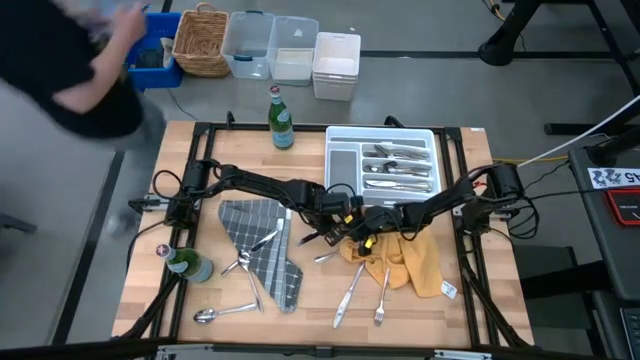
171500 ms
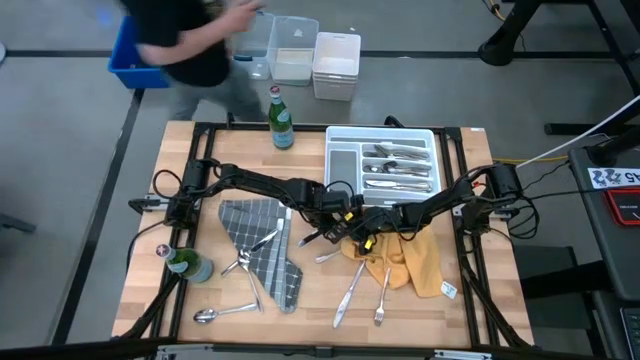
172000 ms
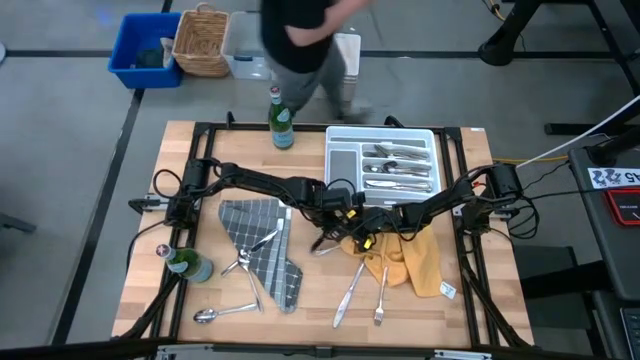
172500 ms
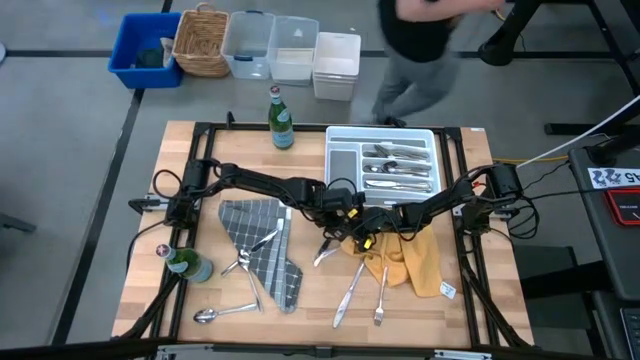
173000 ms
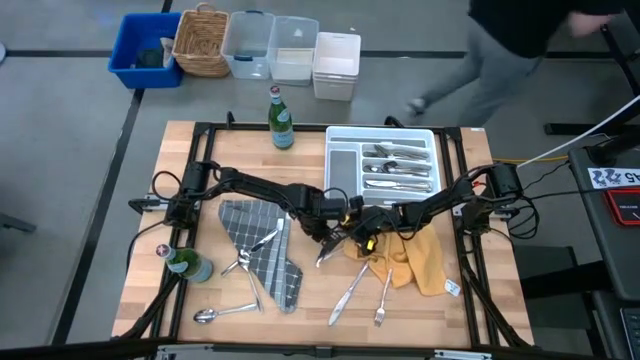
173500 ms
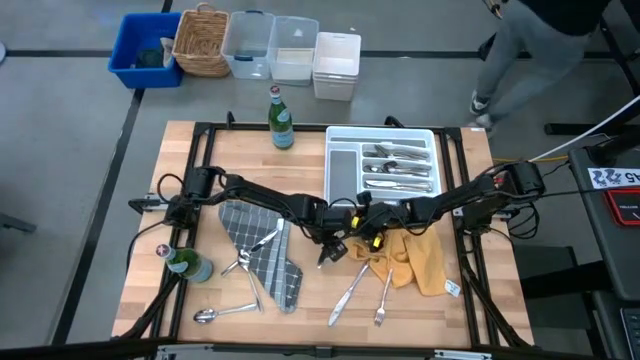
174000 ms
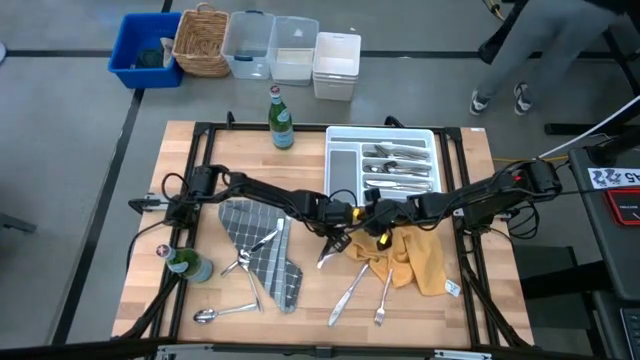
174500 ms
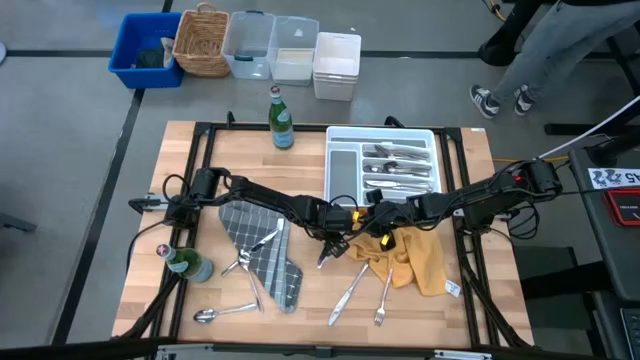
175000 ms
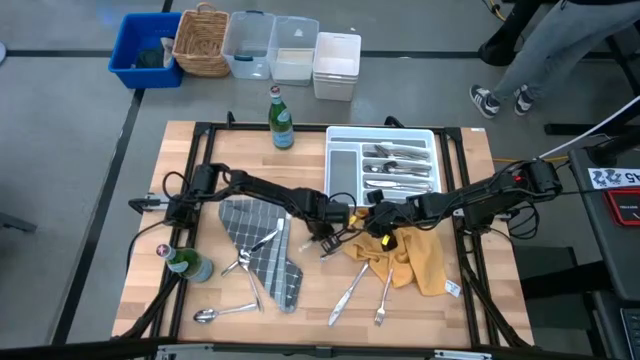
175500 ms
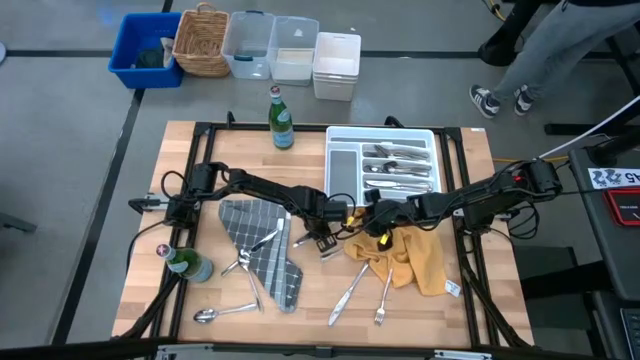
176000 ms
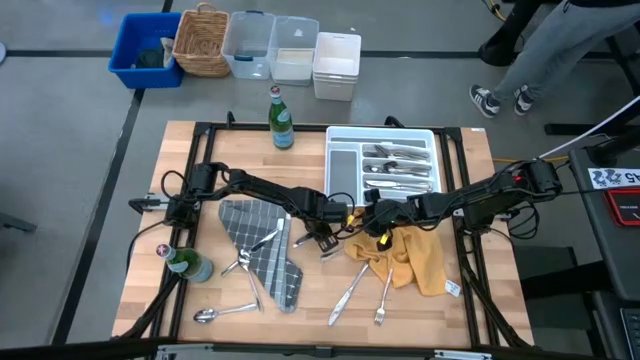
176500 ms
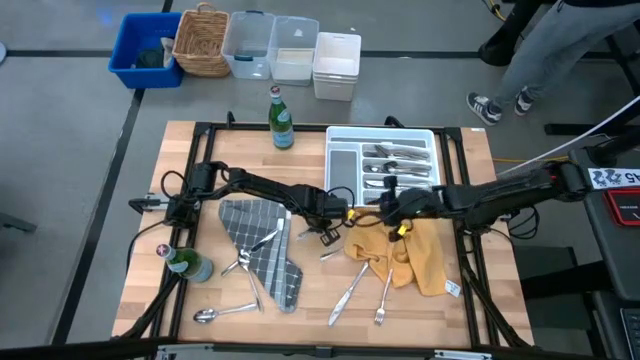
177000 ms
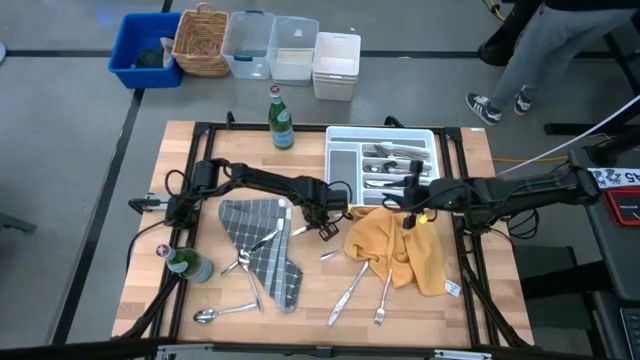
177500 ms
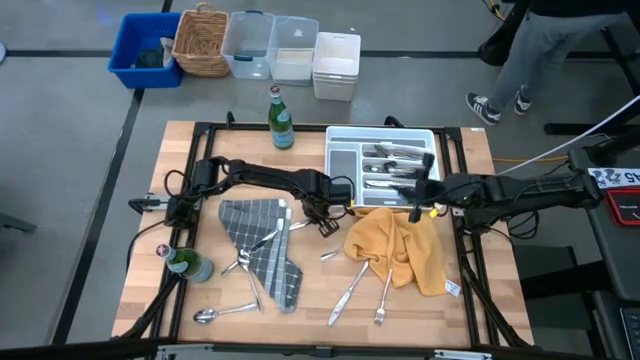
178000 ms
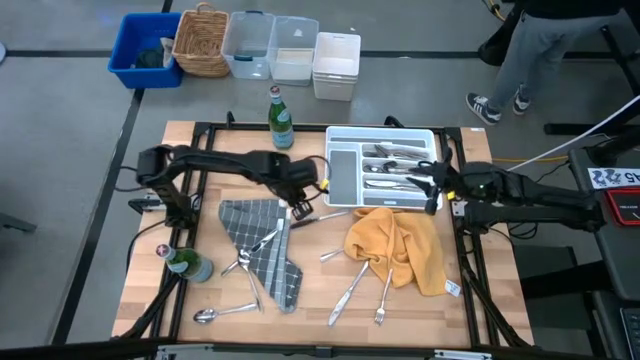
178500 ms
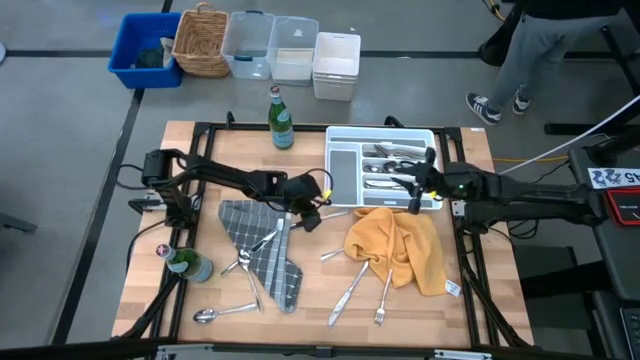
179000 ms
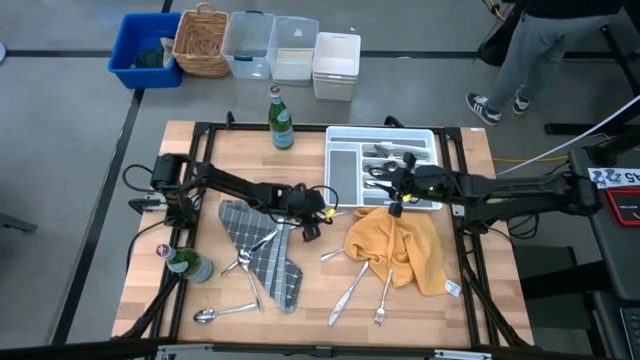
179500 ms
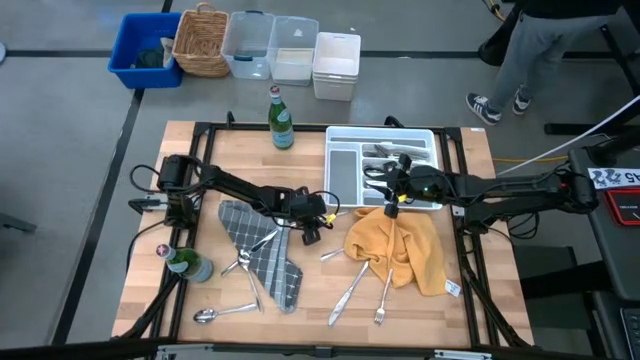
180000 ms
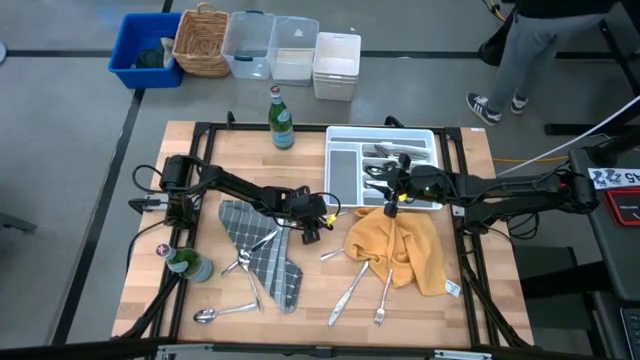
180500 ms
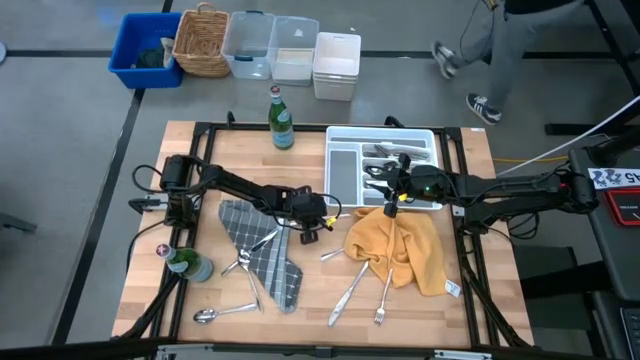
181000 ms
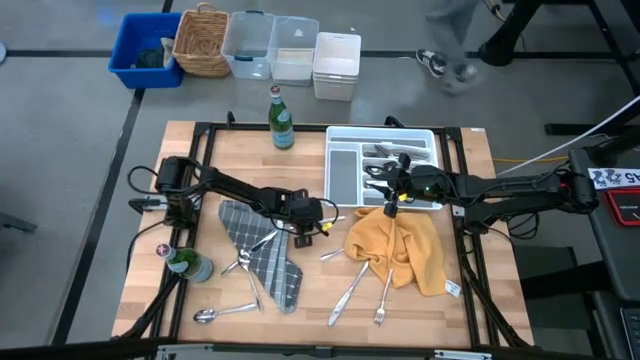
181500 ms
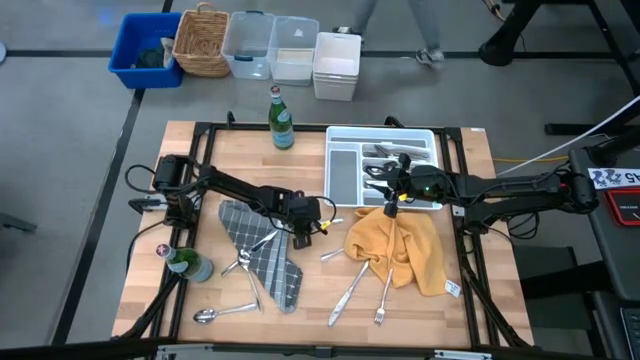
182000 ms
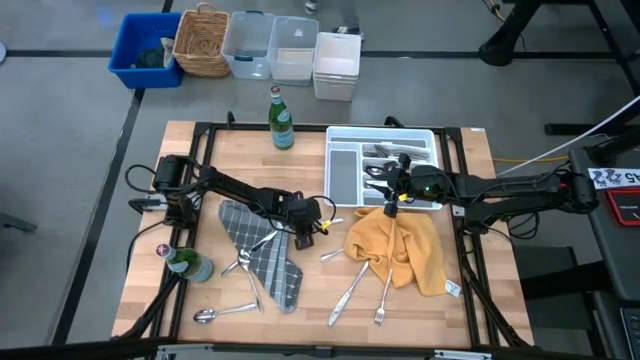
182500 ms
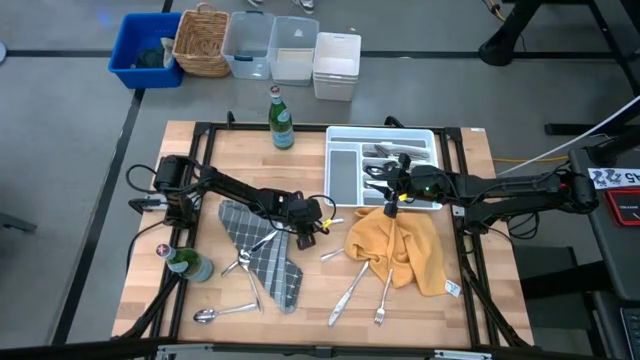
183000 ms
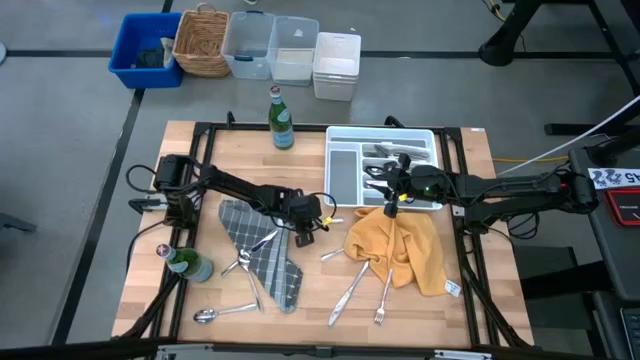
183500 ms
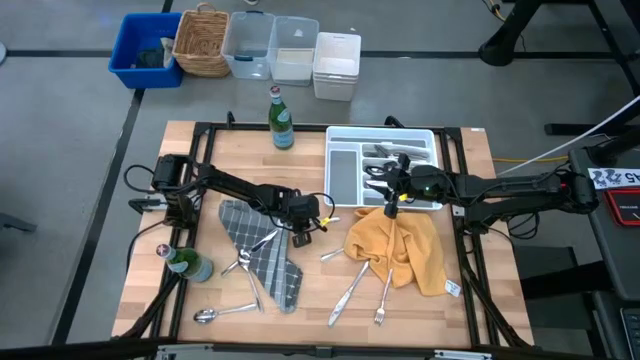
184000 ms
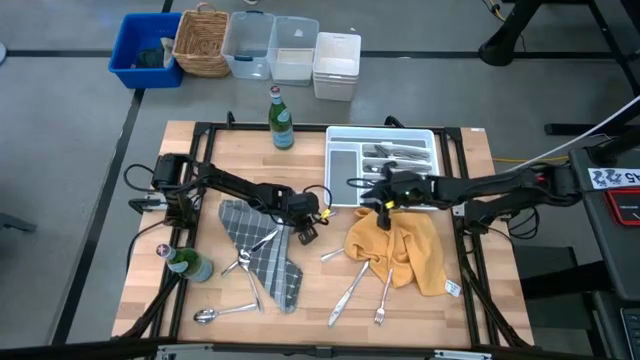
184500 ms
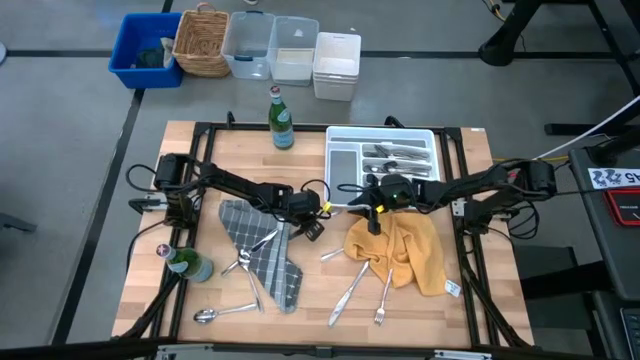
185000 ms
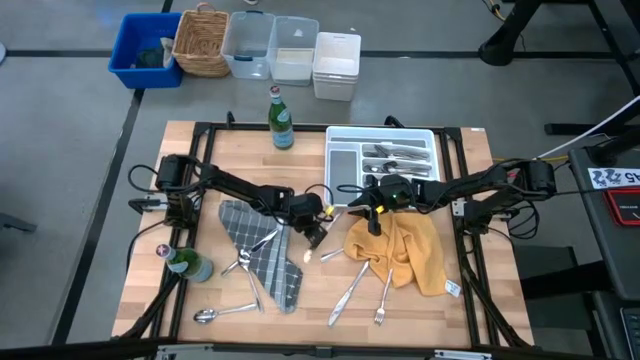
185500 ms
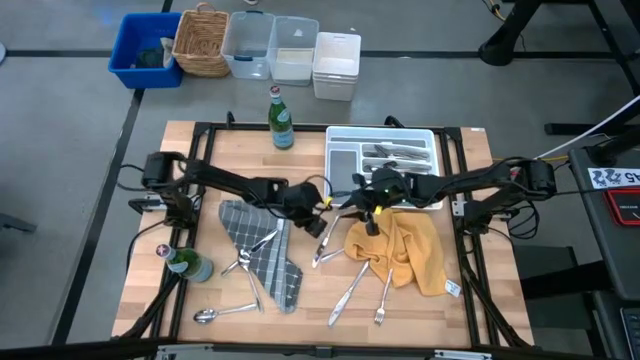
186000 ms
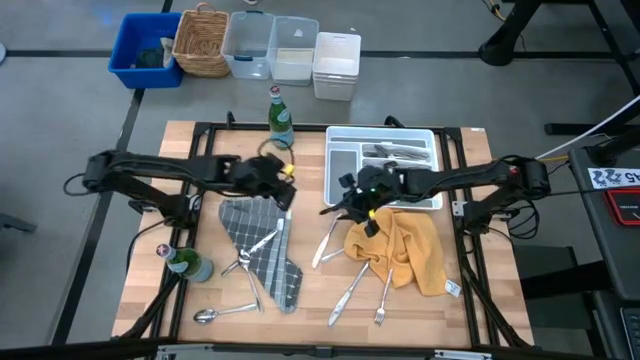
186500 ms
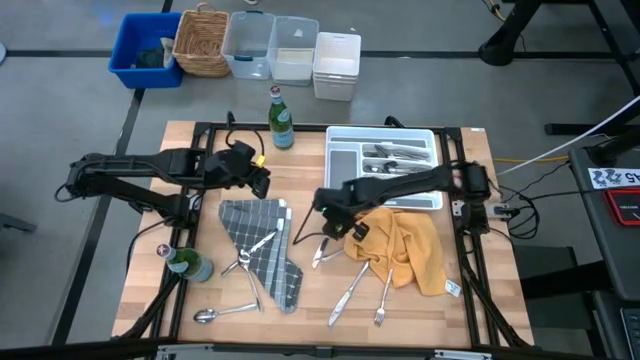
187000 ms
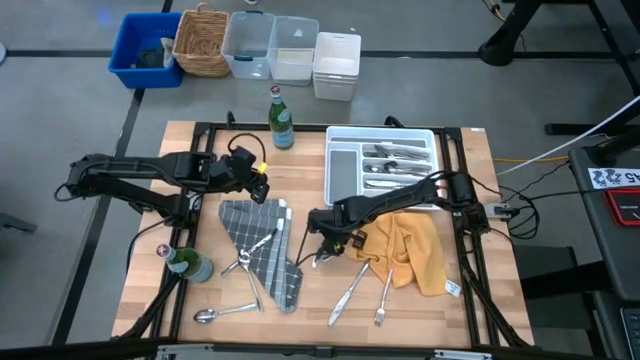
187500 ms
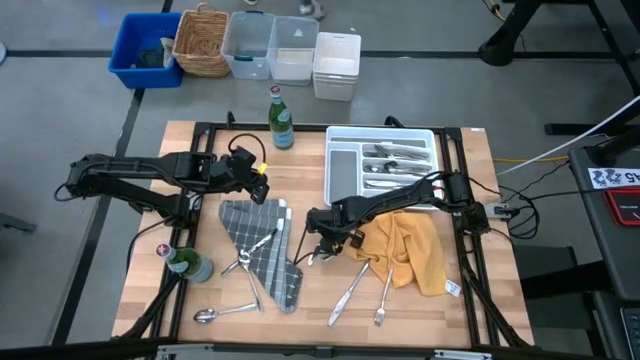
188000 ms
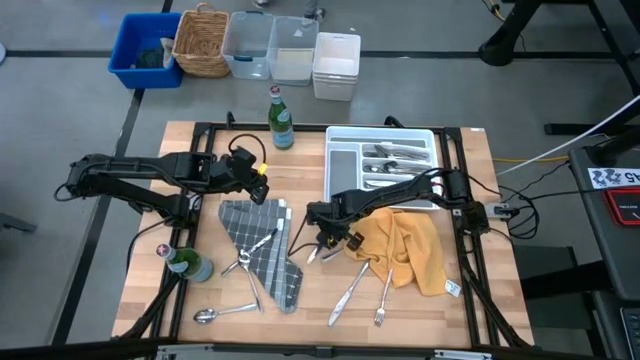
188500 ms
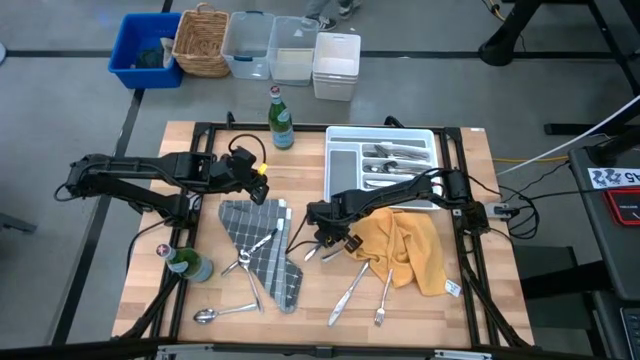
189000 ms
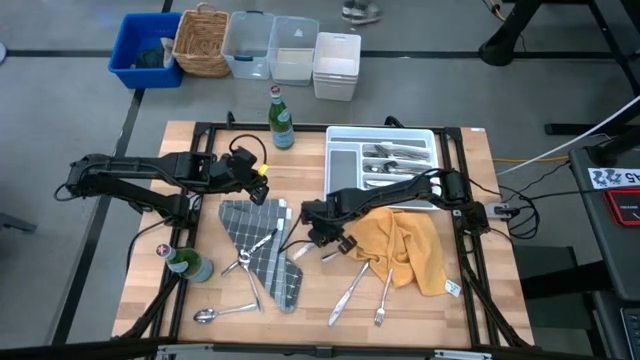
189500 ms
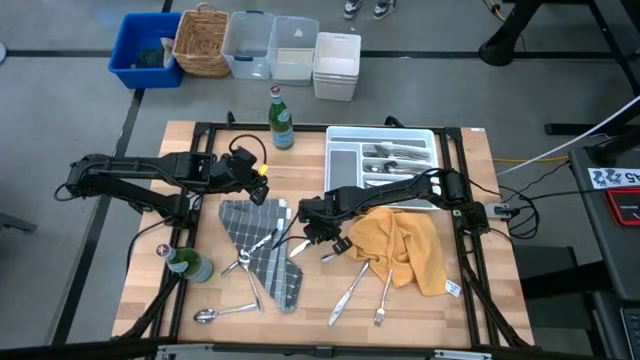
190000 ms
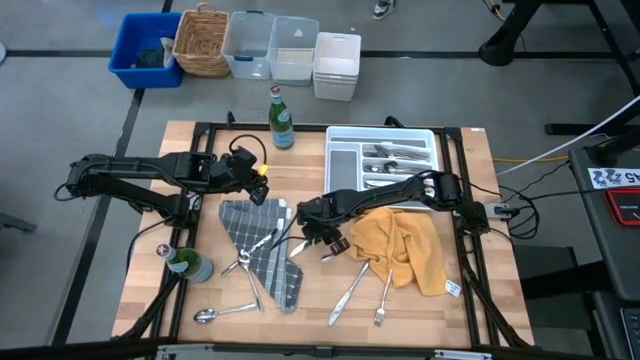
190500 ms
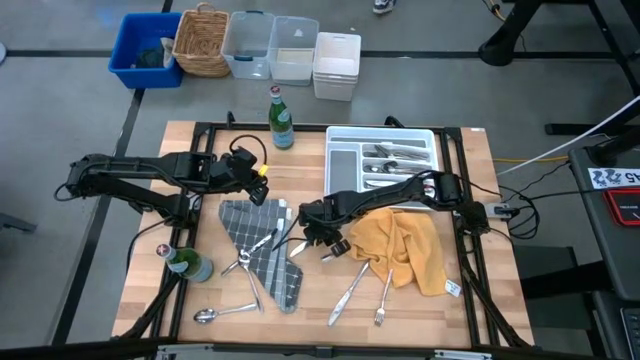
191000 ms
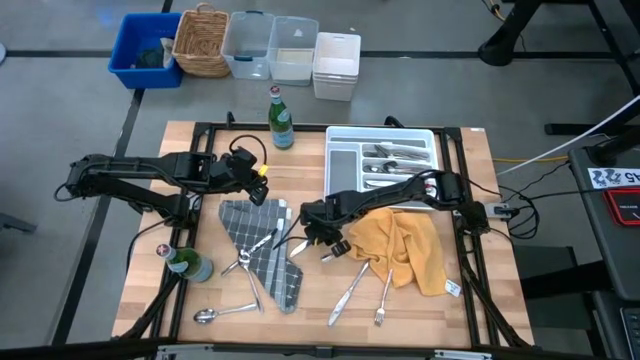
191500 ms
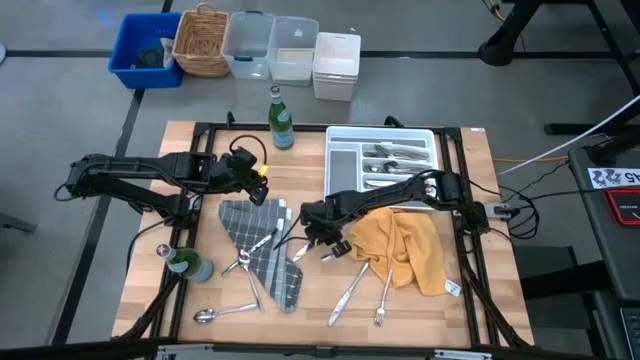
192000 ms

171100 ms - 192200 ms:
Put the silver knife into the cutlery tray
